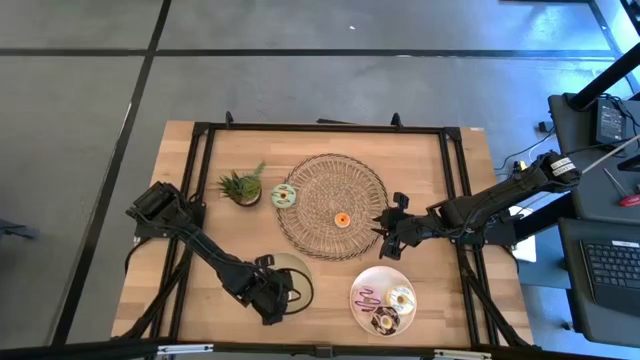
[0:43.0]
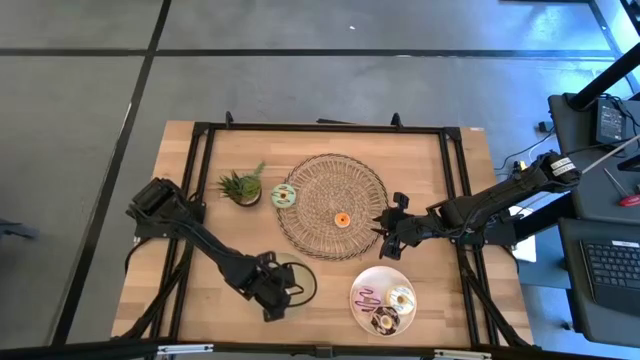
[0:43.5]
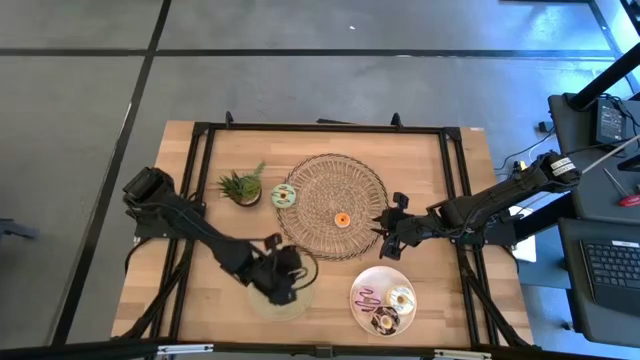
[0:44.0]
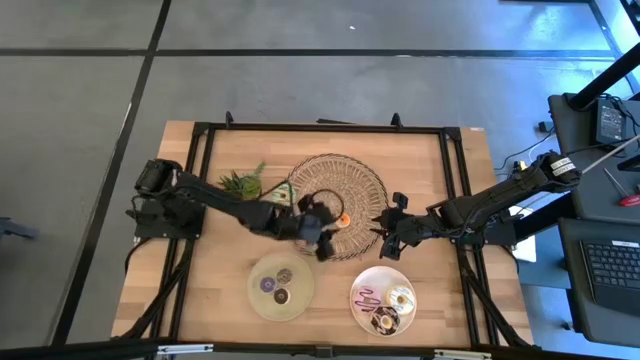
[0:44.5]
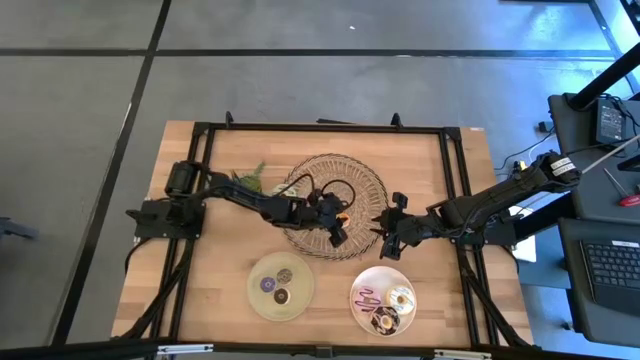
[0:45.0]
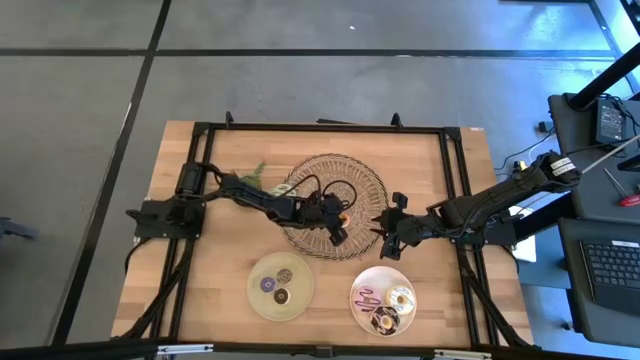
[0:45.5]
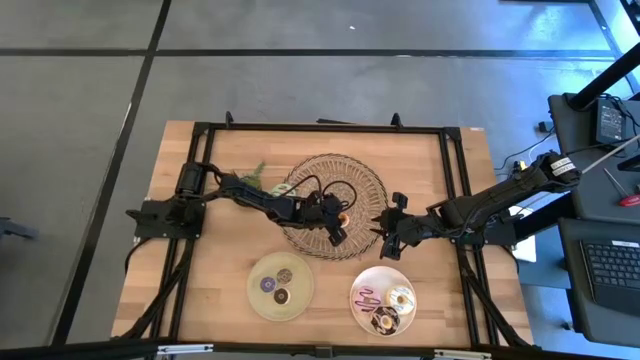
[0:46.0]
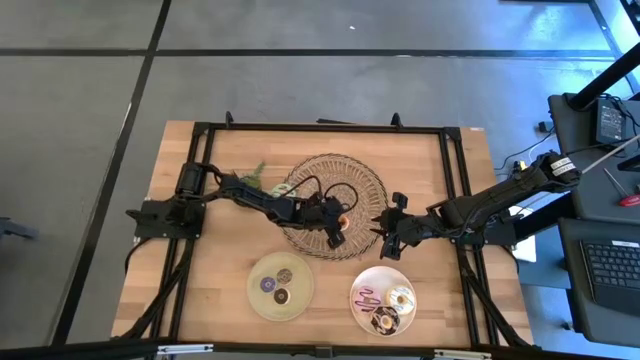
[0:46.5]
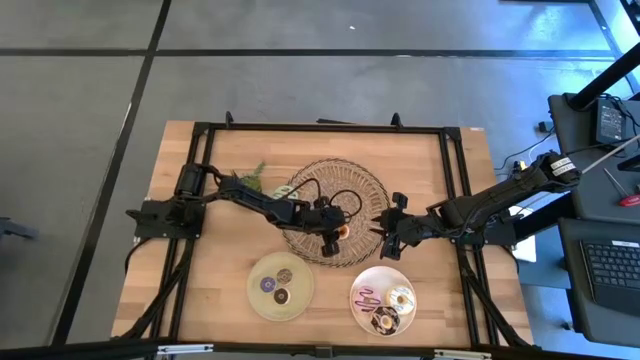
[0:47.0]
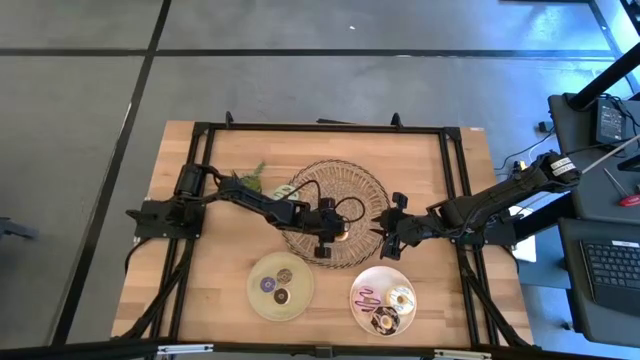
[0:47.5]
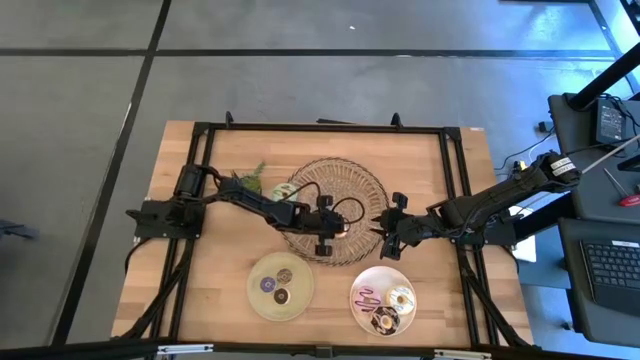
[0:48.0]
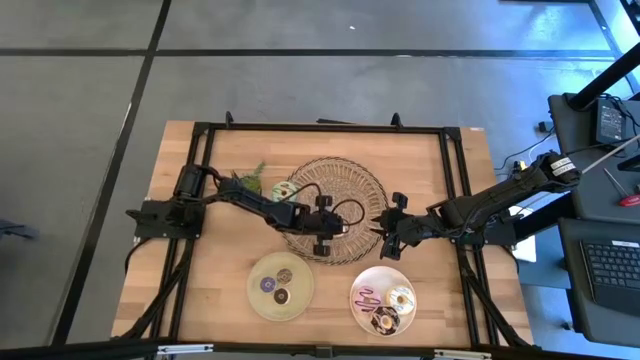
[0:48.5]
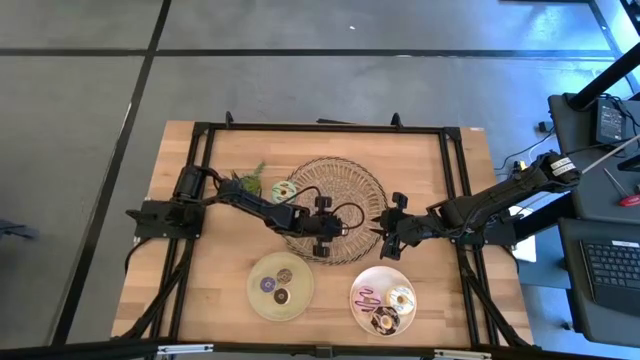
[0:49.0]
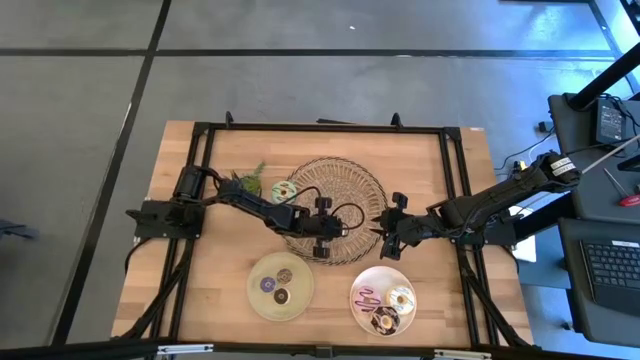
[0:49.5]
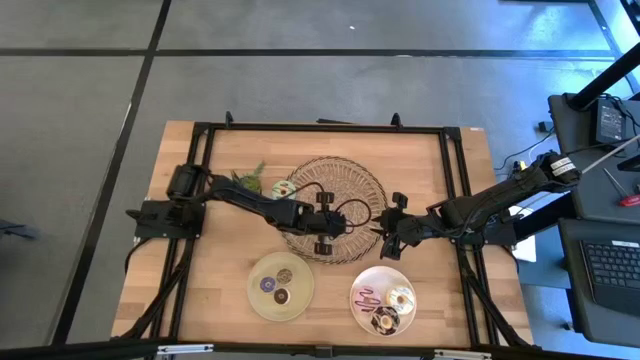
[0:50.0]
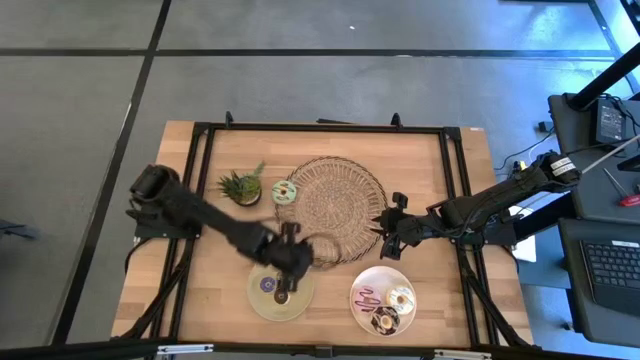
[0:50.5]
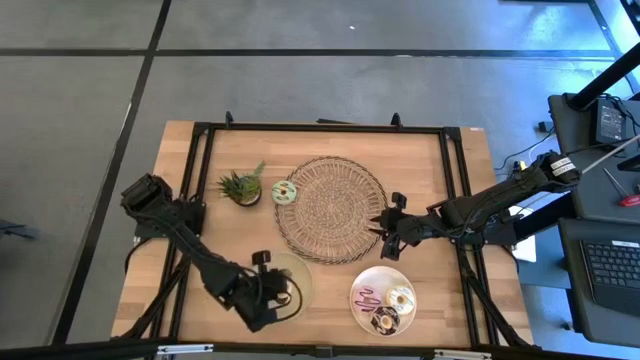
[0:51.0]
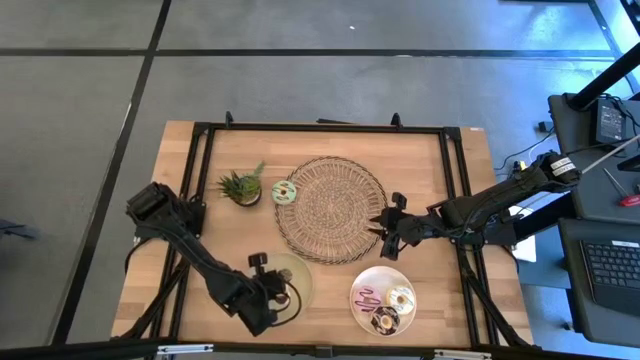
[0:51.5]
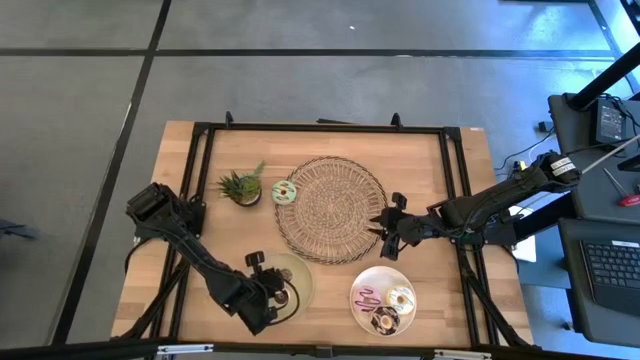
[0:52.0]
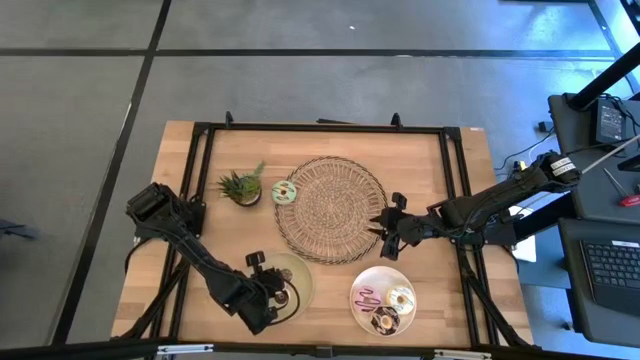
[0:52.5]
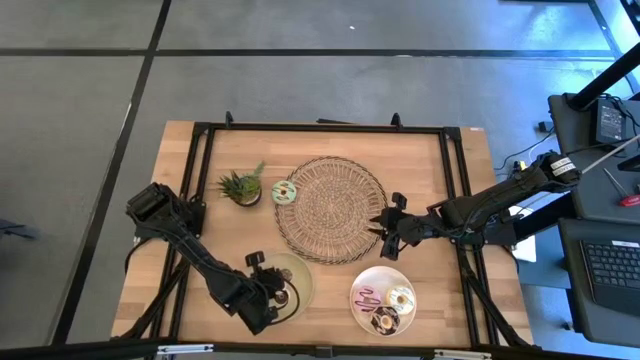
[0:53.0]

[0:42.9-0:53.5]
Task: Pick & Place donuts
Put the small yellow donut on the light gray plate

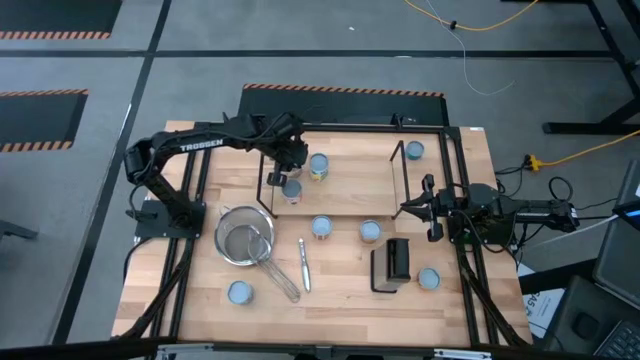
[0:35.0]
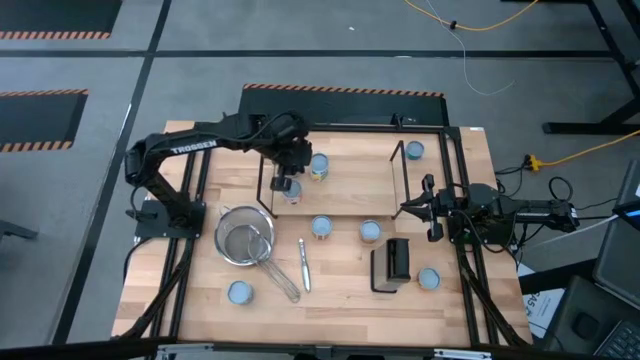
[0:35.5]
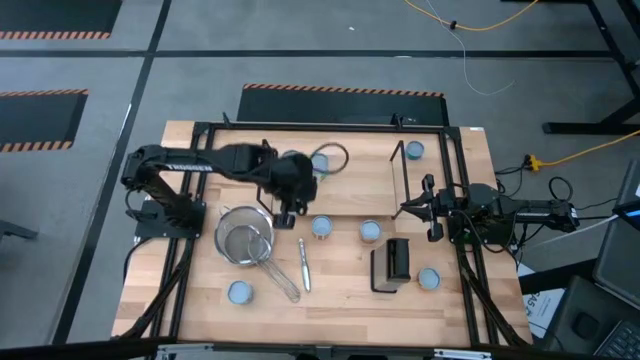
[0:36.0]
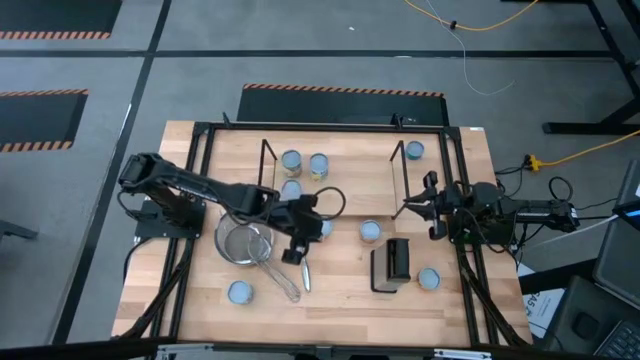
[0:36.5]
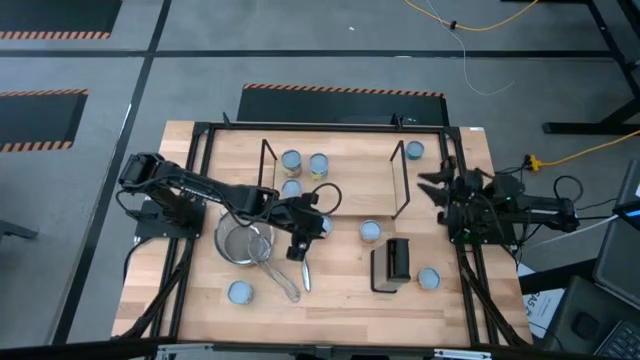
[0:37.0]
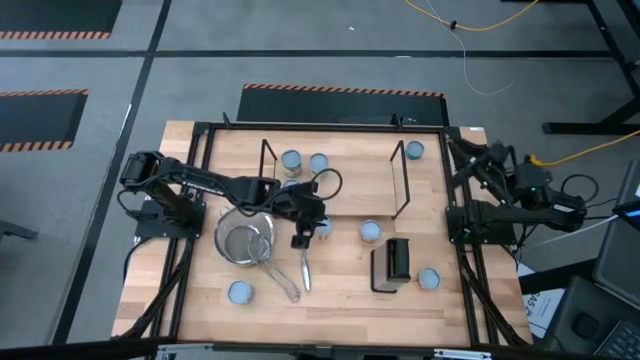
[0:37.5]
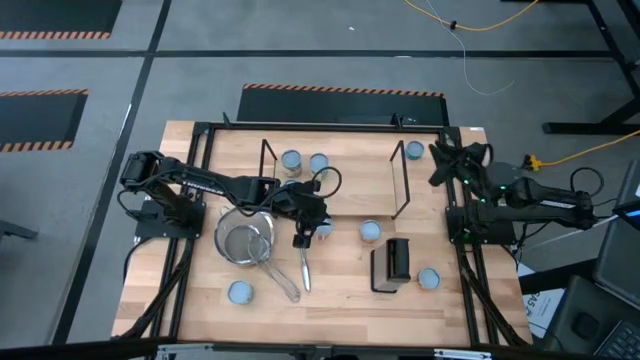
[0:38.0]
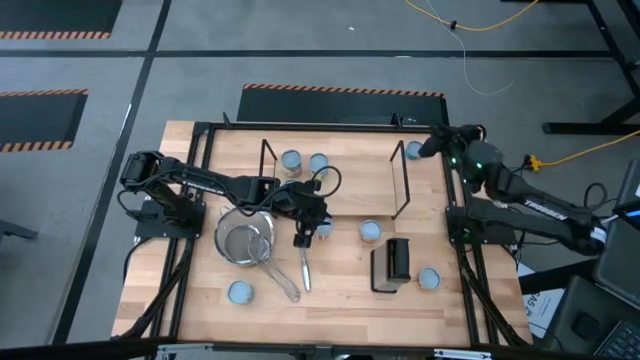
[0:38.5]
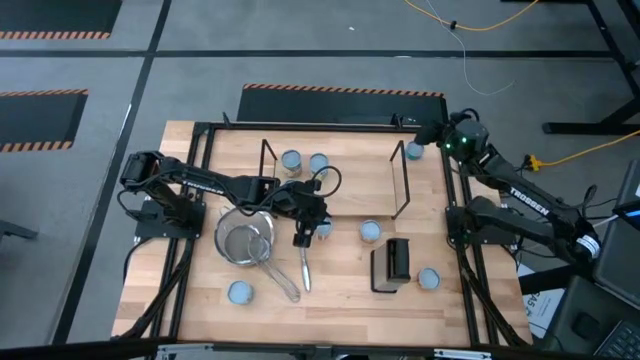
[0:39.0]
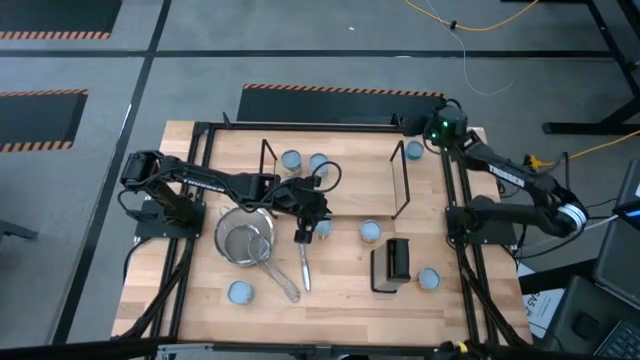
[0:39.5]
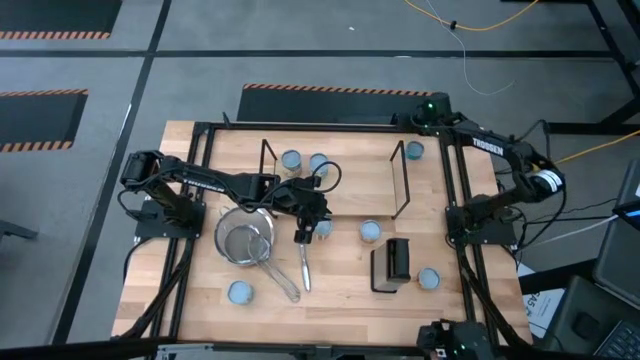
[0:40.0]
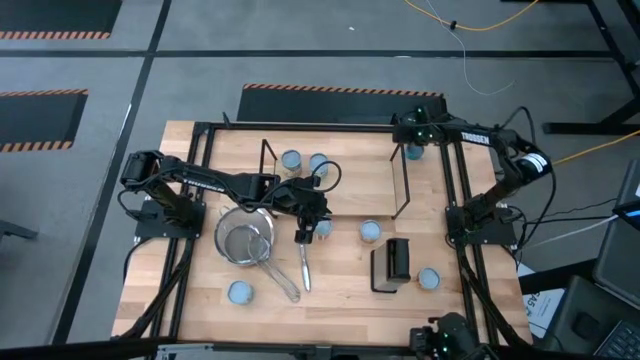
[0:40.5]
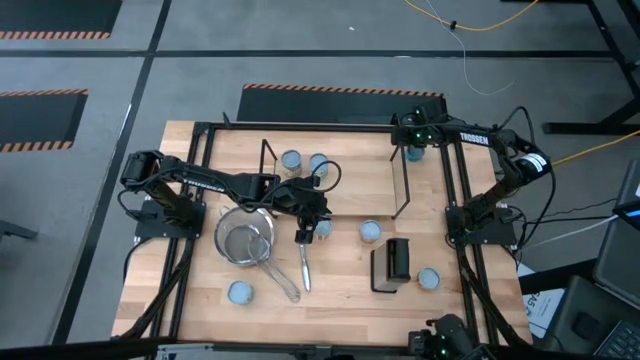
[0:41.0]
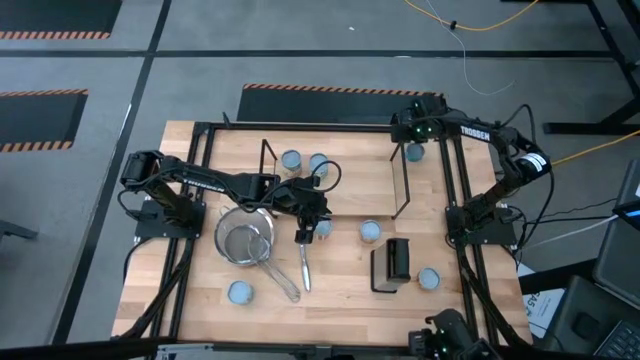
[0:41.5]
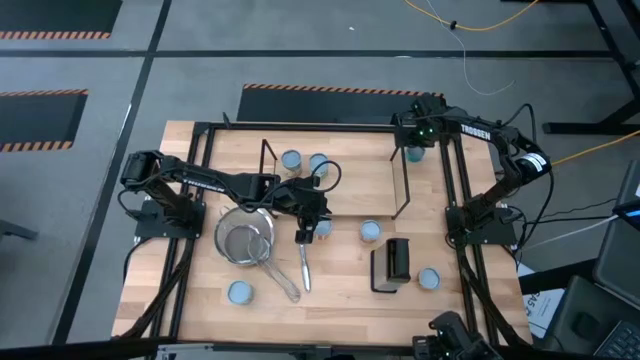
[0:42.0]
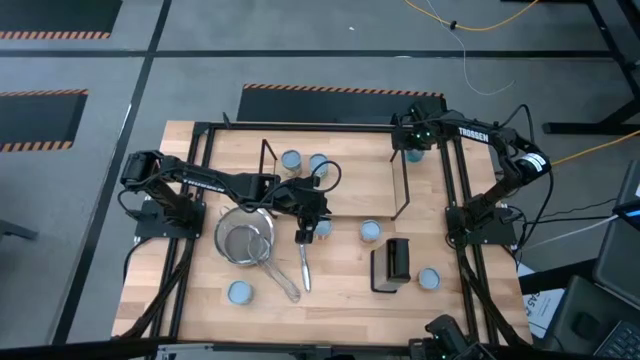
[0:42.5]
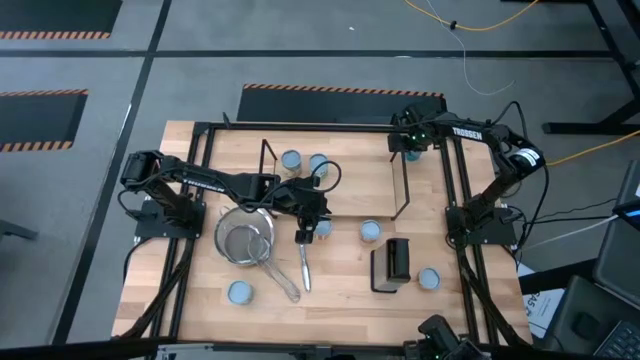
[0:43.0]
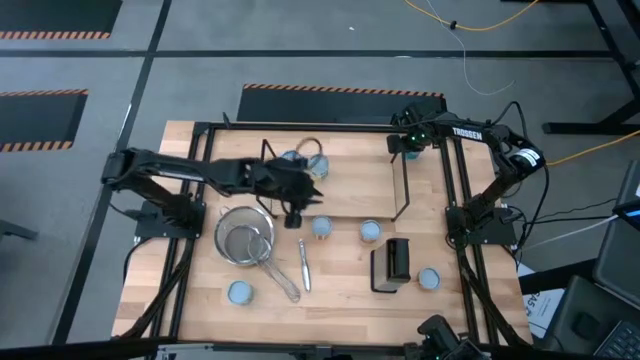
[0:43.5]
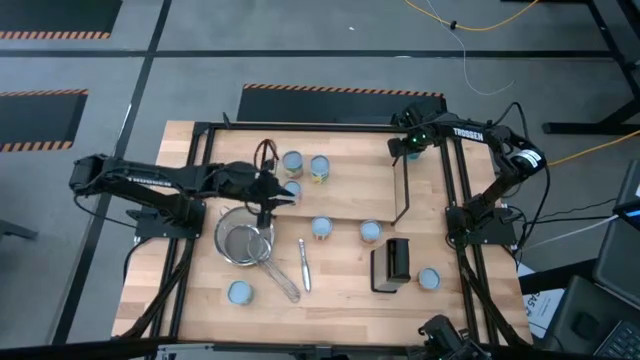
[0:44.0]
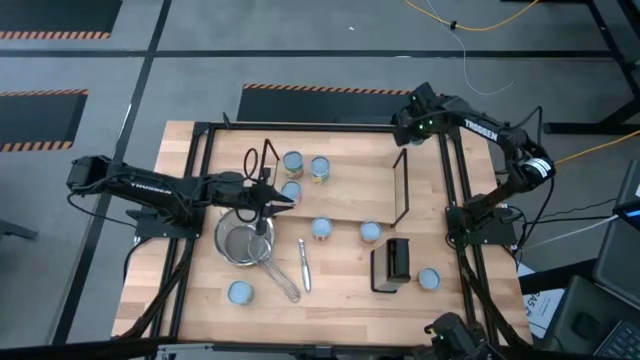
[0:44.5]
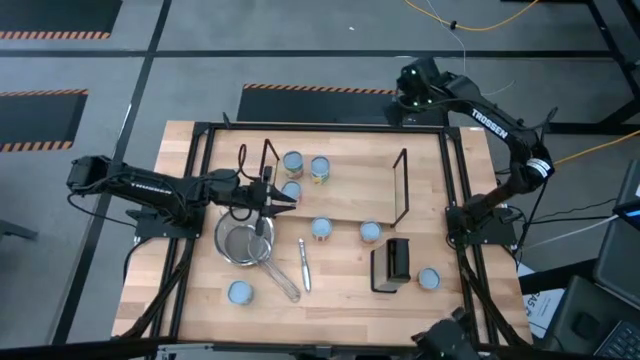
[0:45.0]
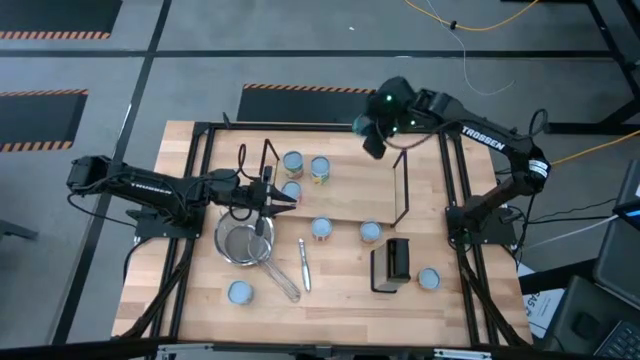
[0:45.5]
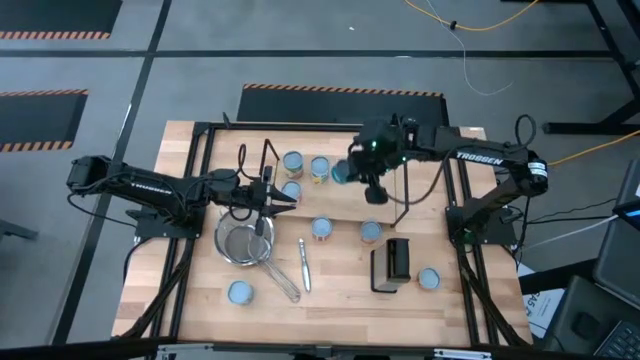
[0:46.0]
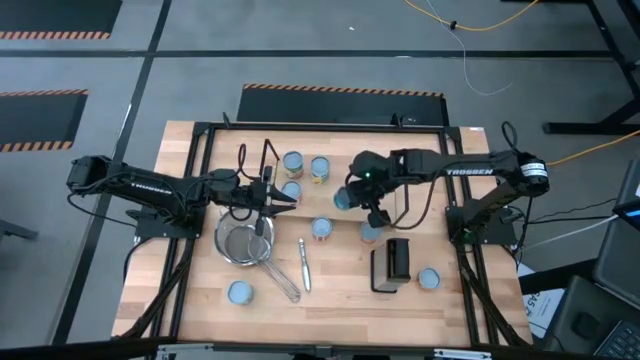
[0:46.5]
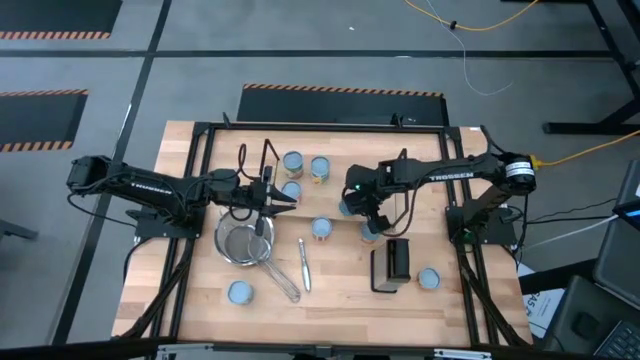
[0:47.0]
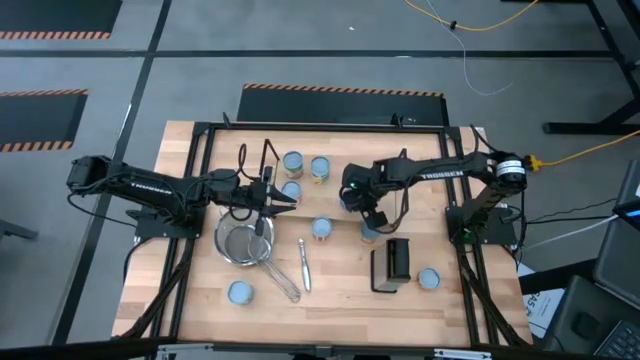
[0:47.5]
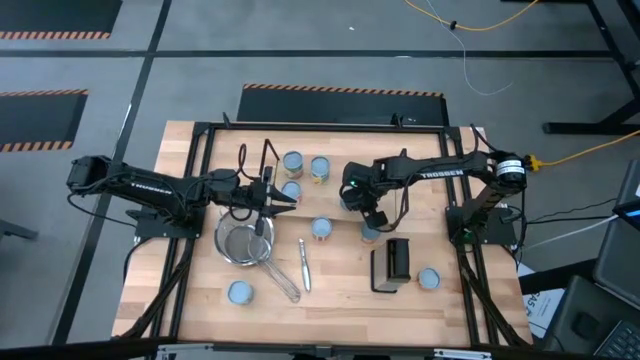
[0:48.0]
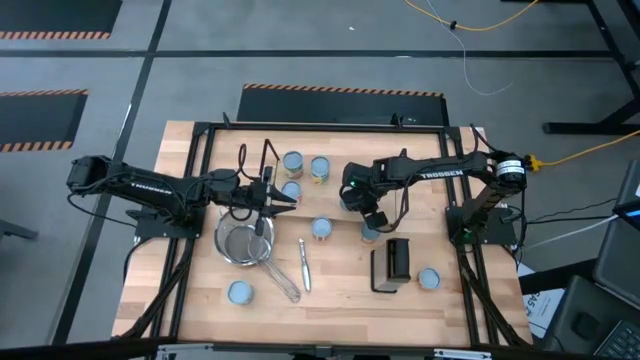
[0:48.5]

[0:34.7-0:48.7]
Task: Pick and place cans onto a shelf
Put the blue can on the shelf
